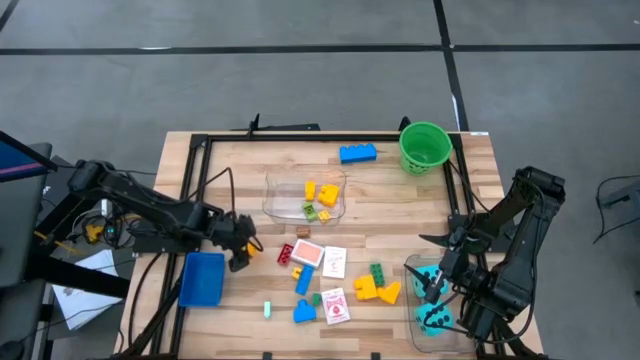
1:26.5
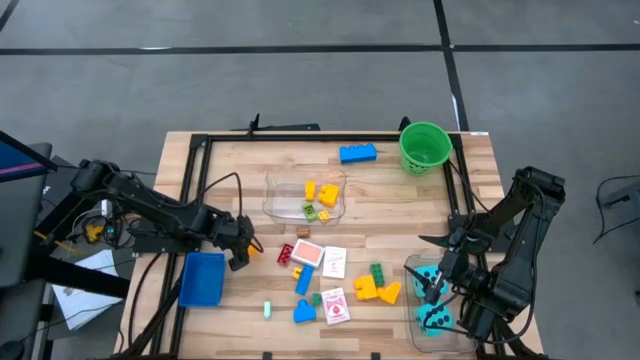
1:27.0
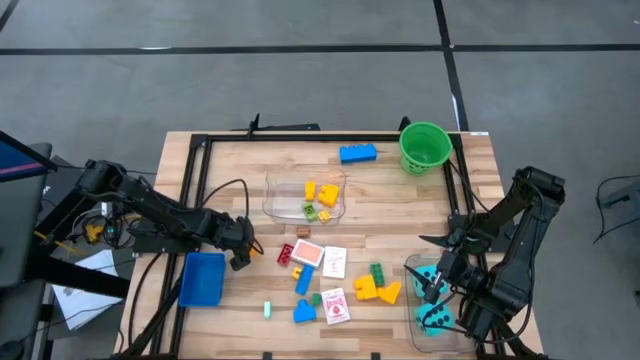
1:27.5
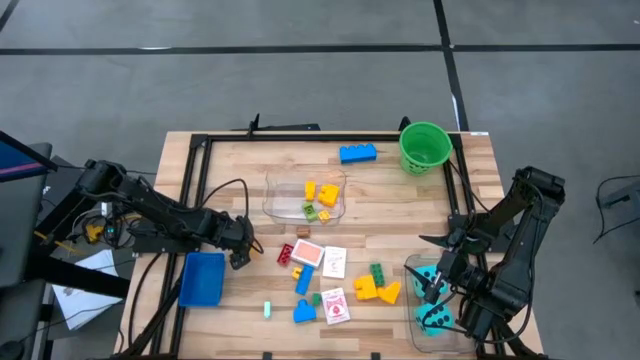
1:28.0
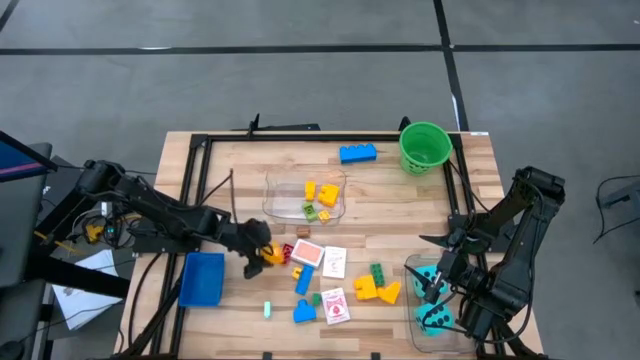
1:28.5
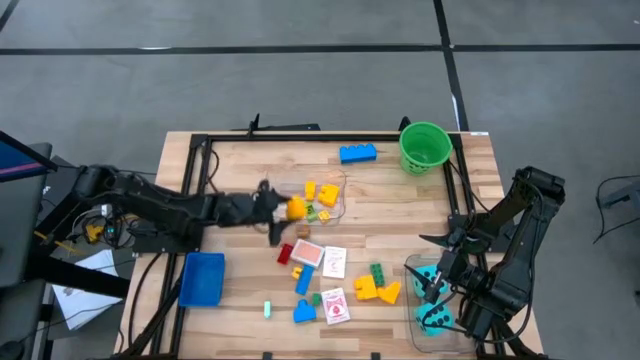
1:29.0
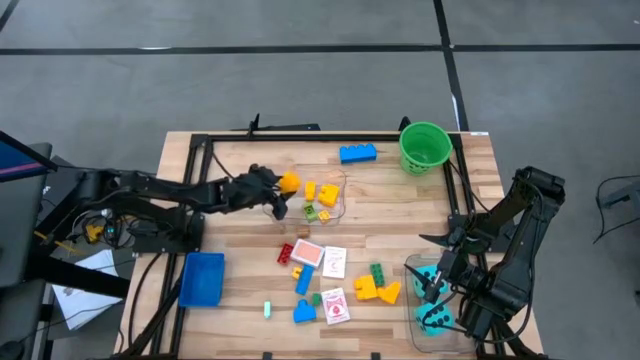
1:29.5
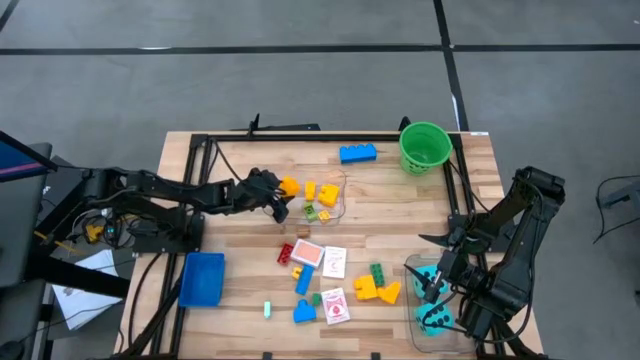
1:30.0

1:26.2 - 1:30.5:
Task: Pick & Place Toys
Put the yellow game piece into the top transparent bin

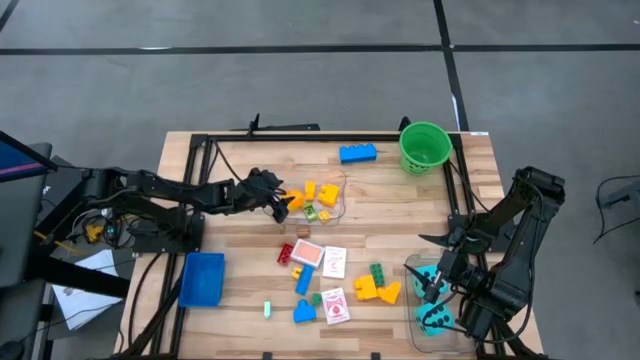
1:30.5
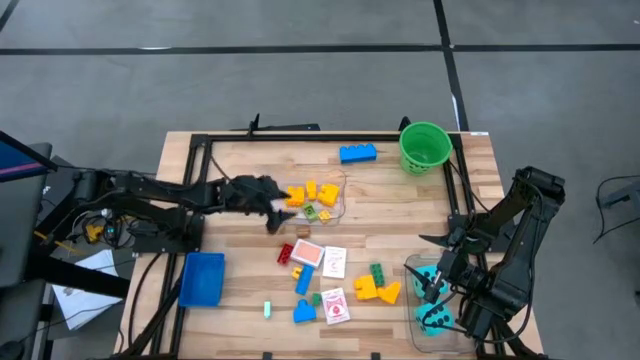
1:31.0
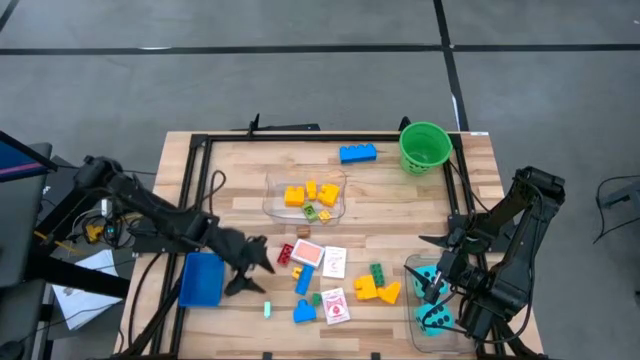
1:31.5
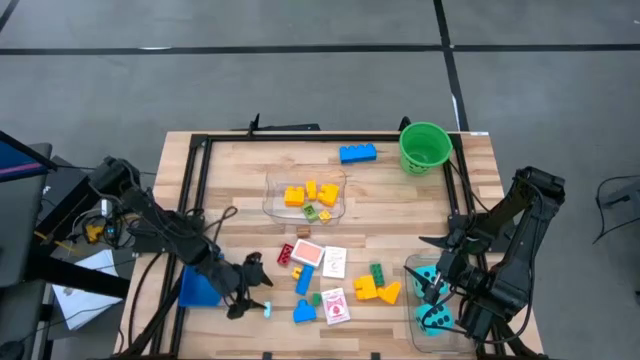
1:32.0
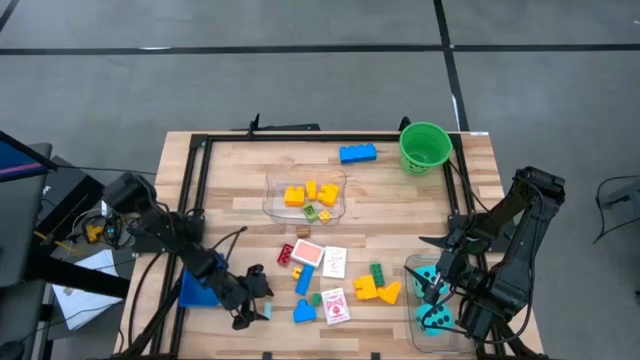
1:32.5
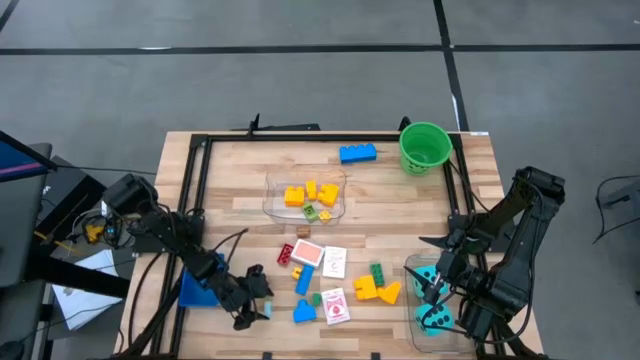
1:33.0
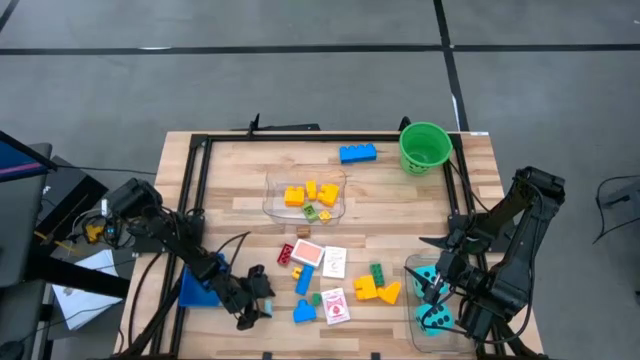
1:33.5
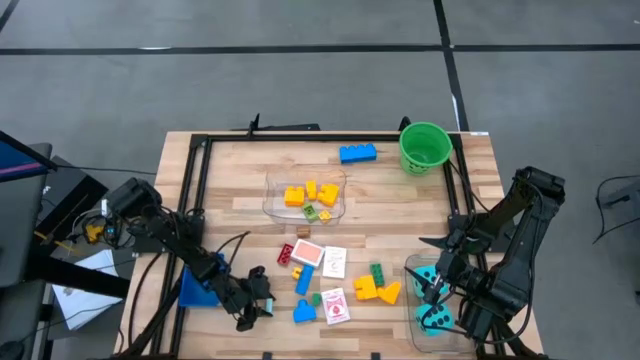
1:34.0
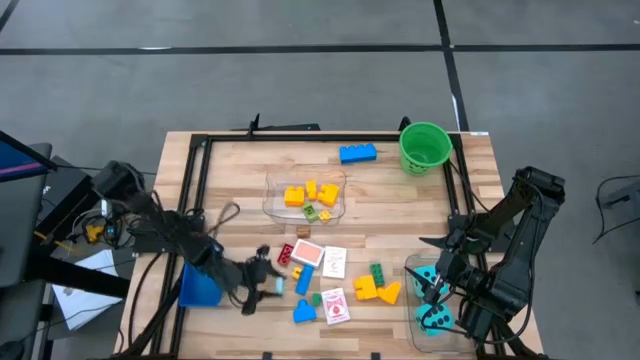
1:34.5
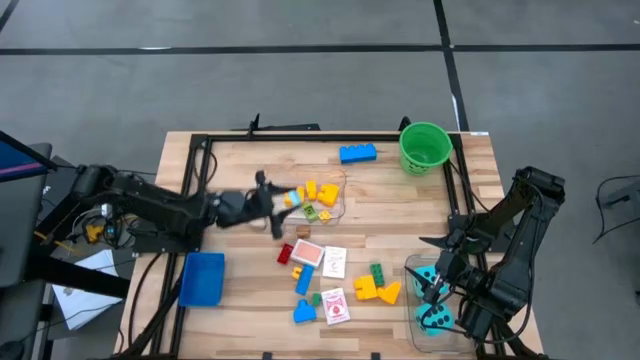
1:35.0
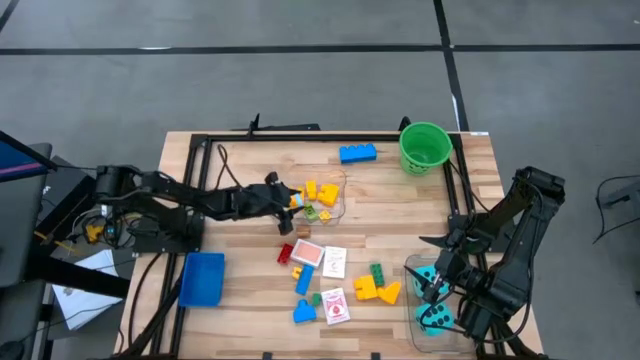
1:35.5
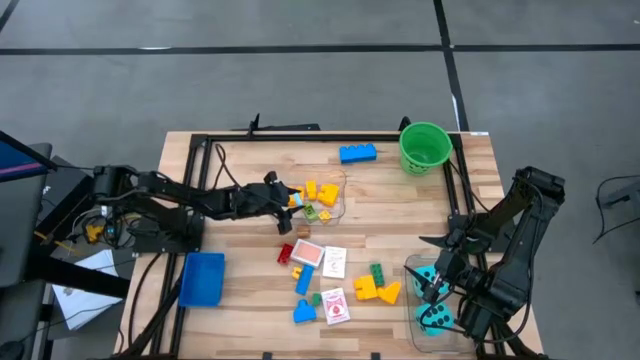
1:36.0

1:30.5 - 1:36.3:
Put the light blue game piece into the top transparent bin

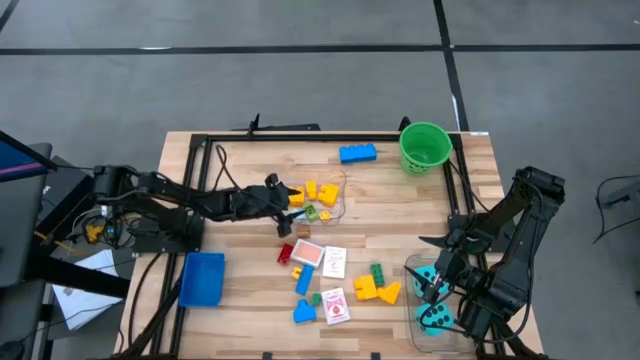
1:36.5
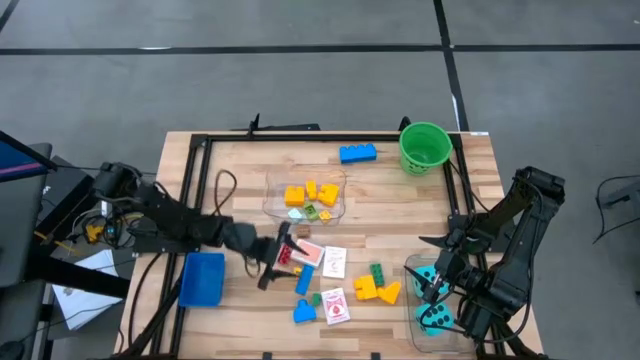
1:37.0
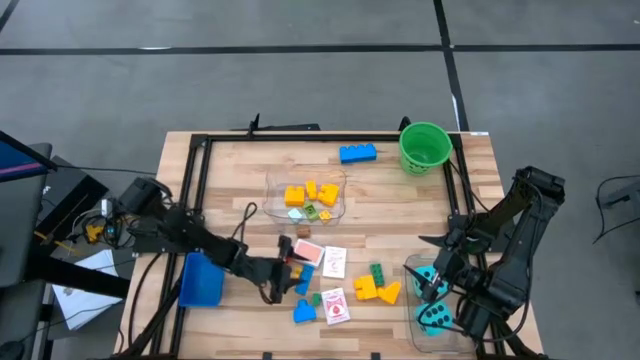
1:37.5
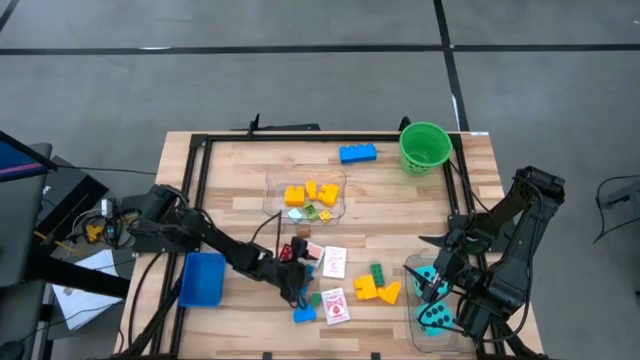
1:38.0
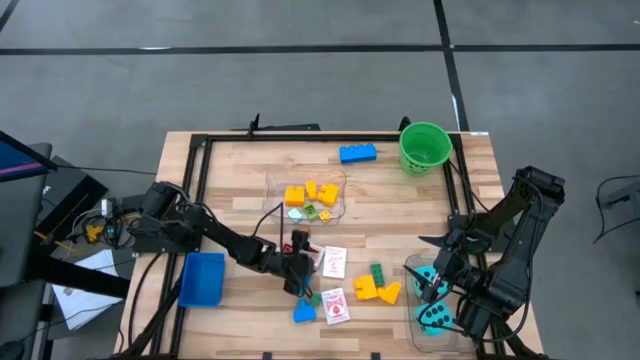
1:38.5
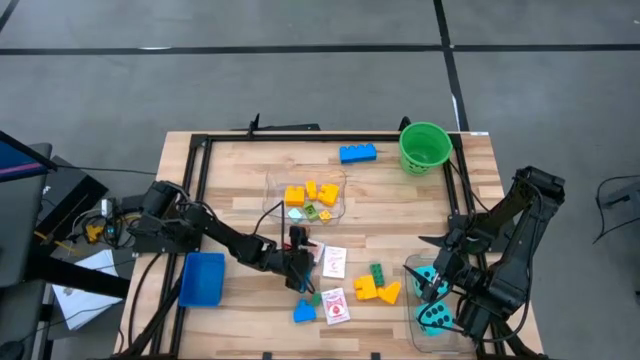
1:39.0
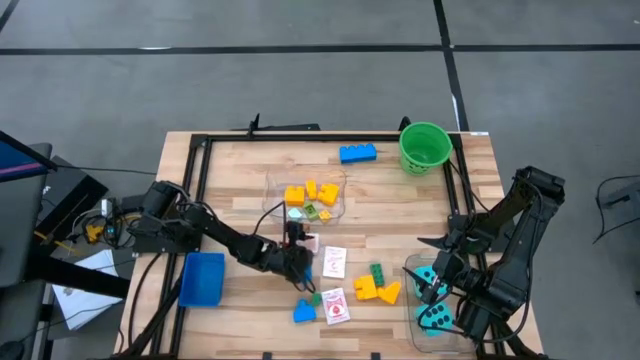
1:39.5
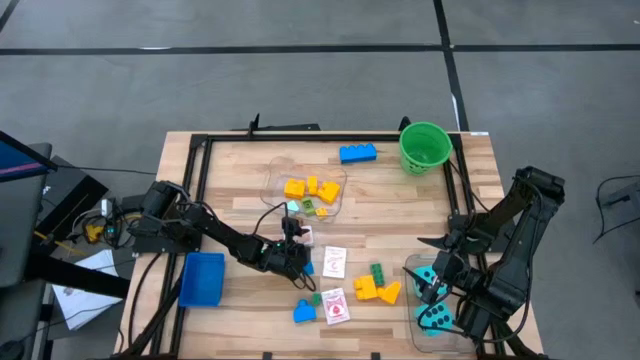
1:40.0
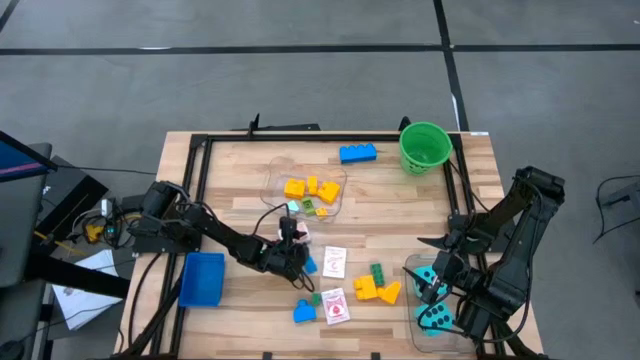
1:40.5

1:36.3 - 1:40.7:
Adjust the orange playing card box on the table

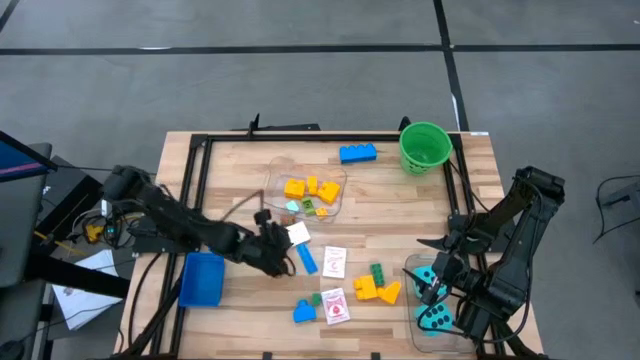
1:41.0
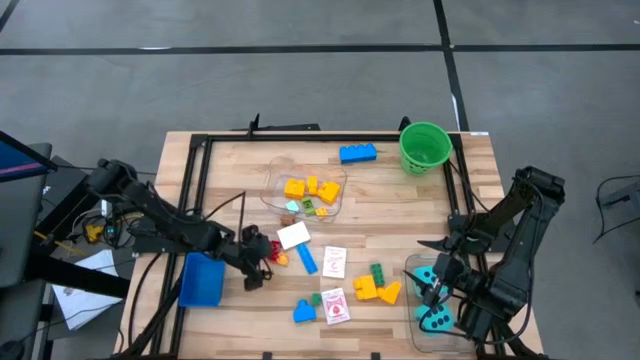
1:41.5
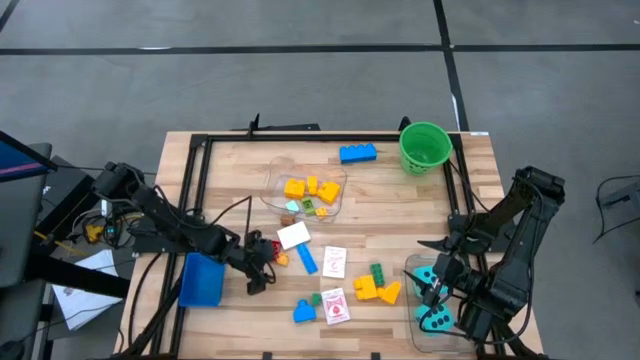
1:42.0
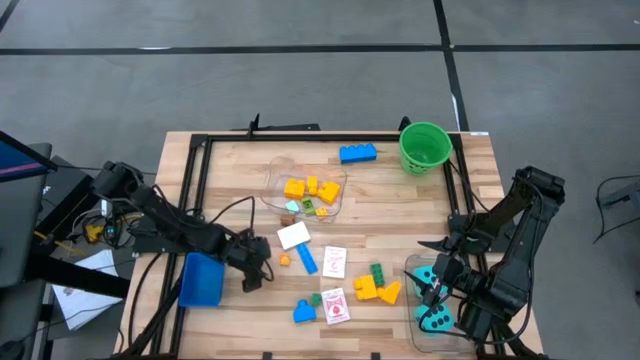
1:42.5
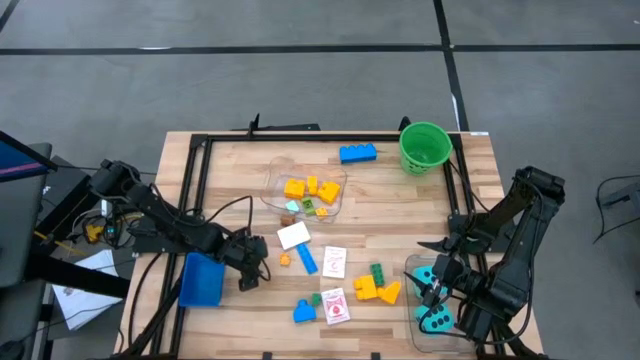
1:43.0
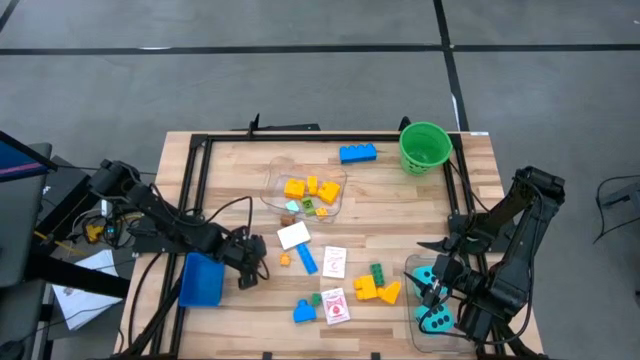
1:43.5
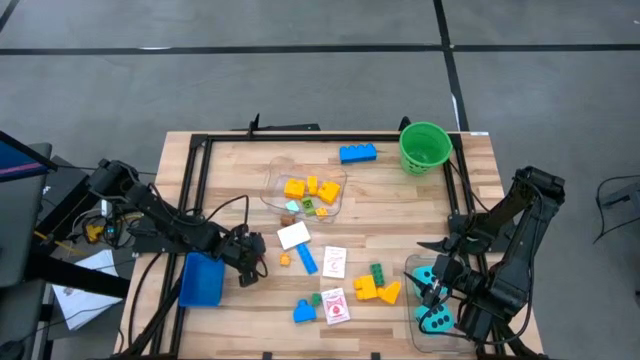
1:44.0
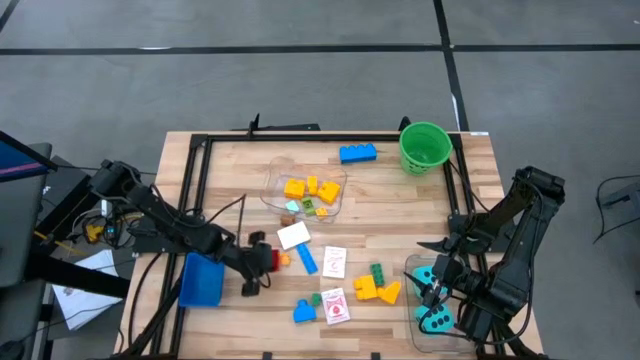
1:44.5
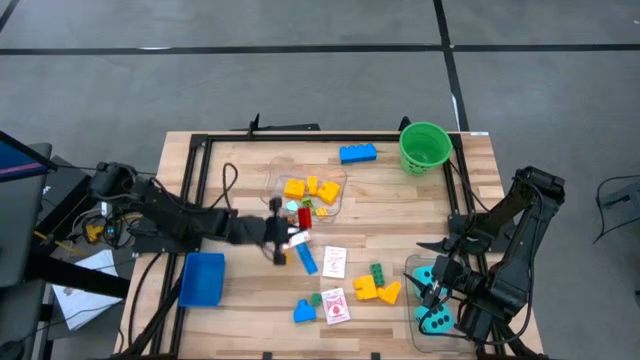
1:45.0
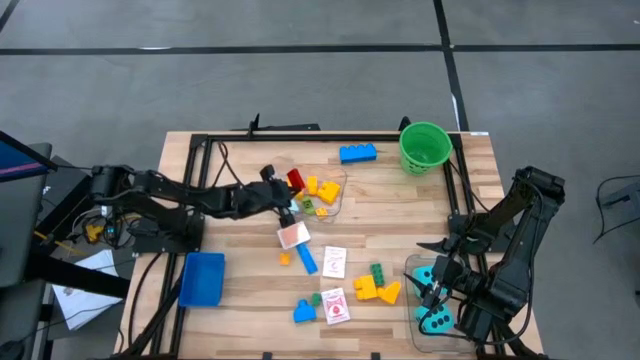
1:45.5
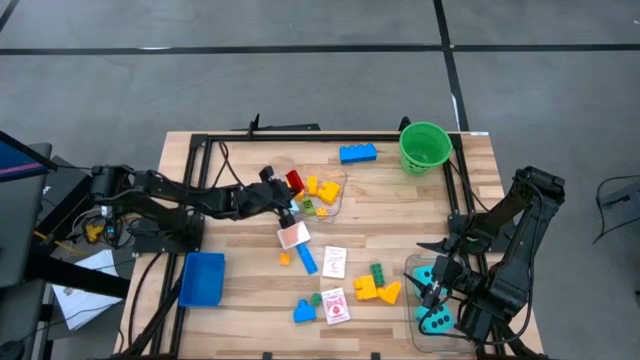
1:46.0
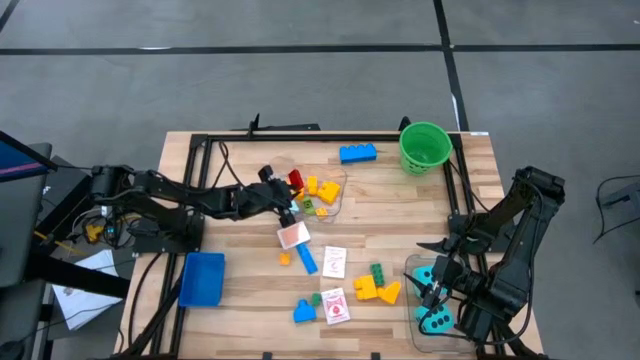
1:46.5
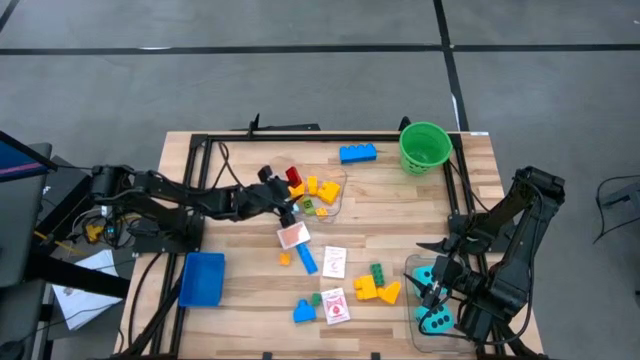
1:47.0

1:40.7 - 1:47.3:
Put the red game piece into the top transparent bin
